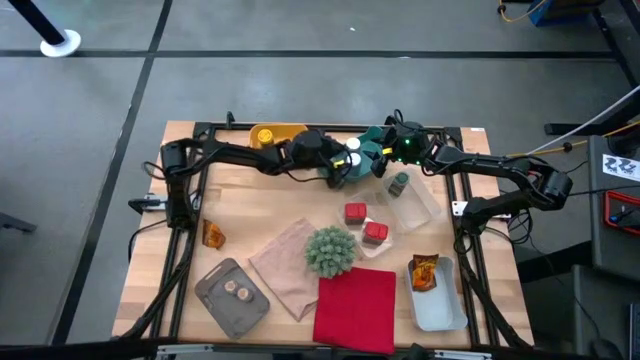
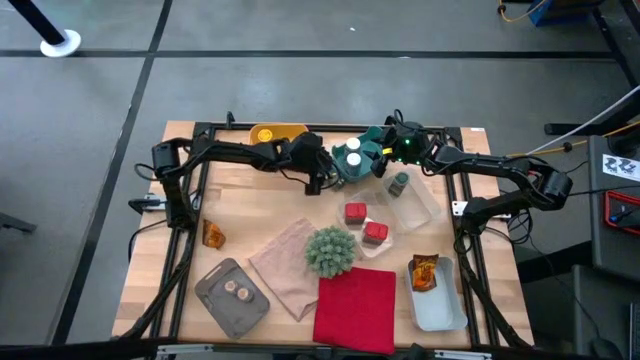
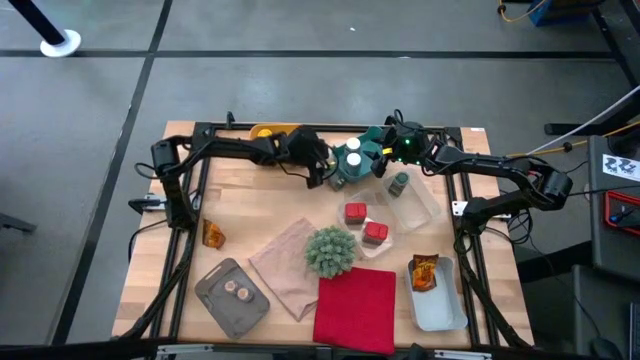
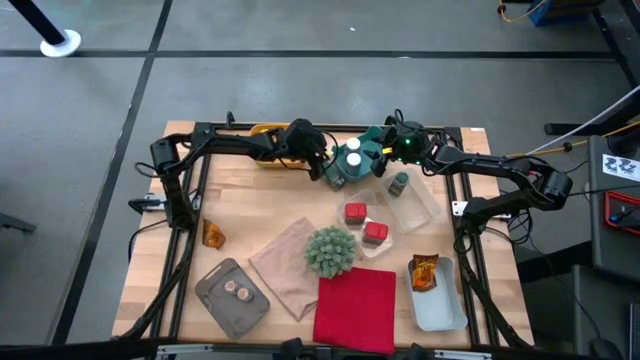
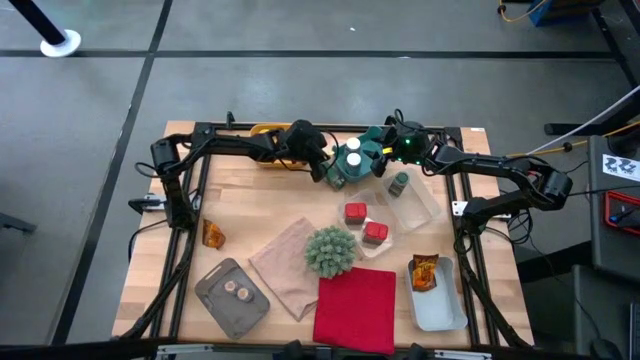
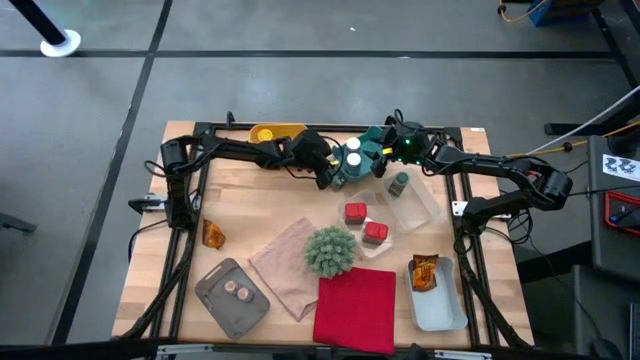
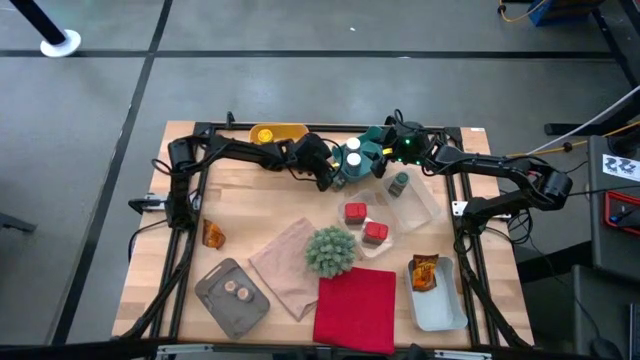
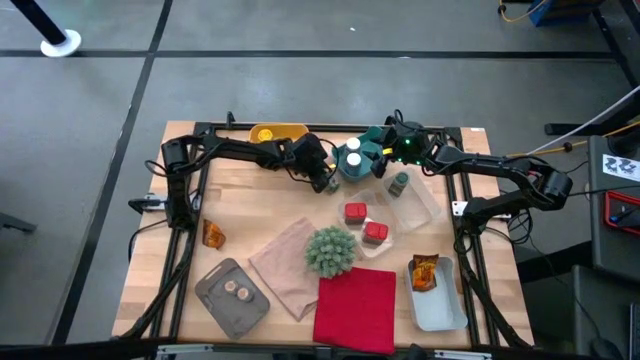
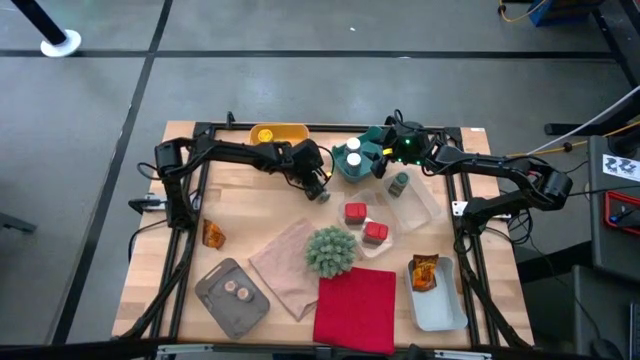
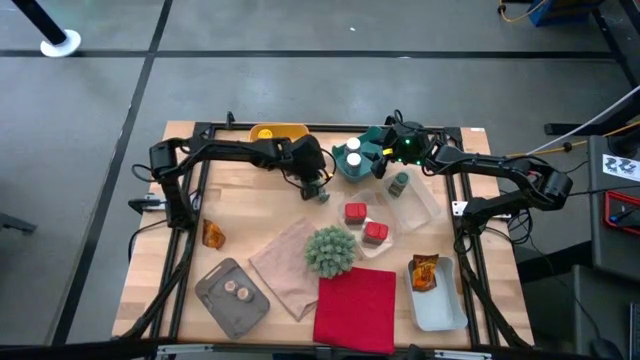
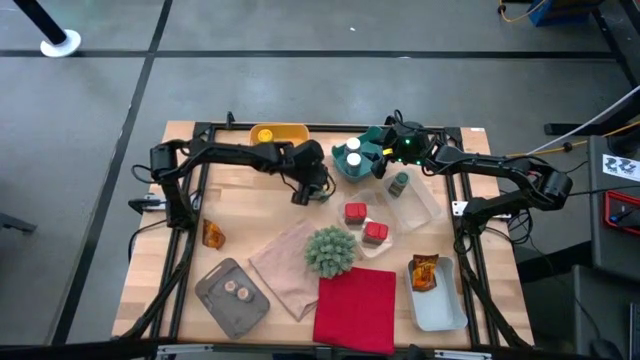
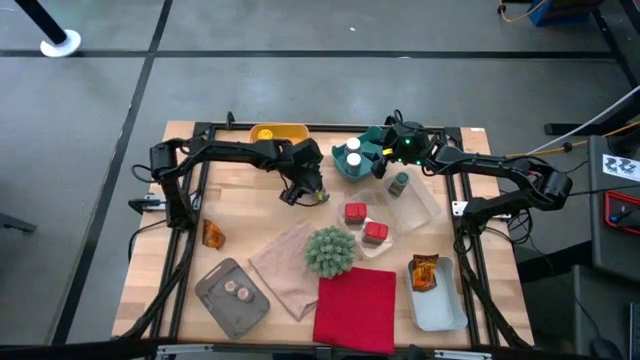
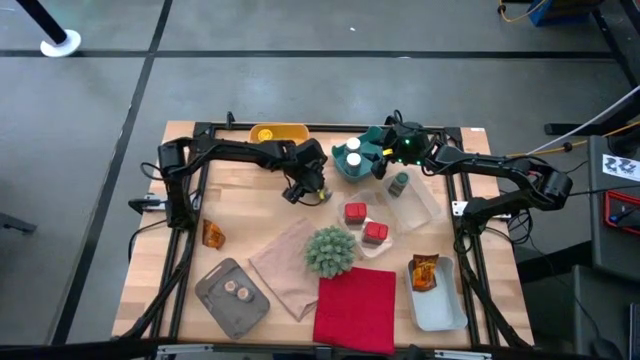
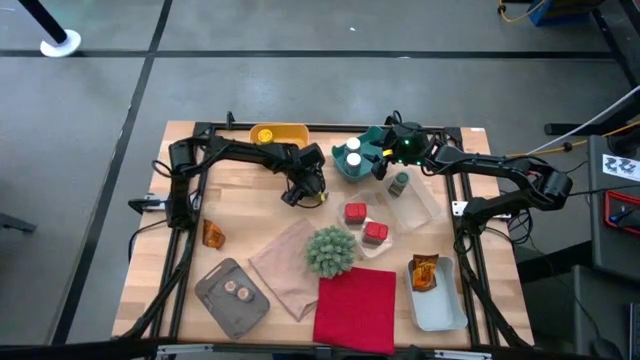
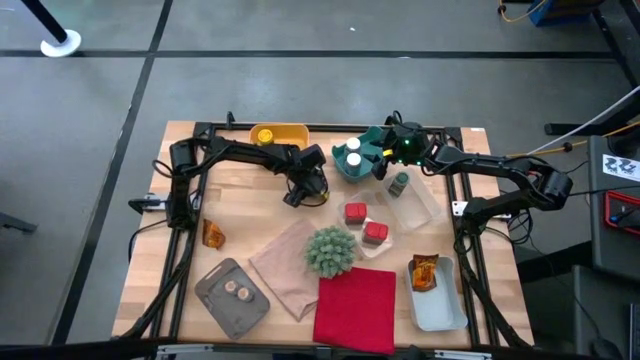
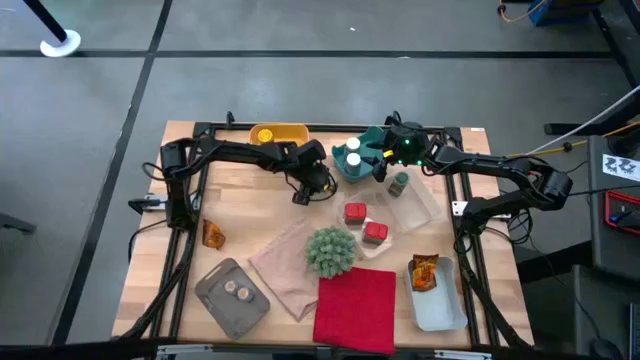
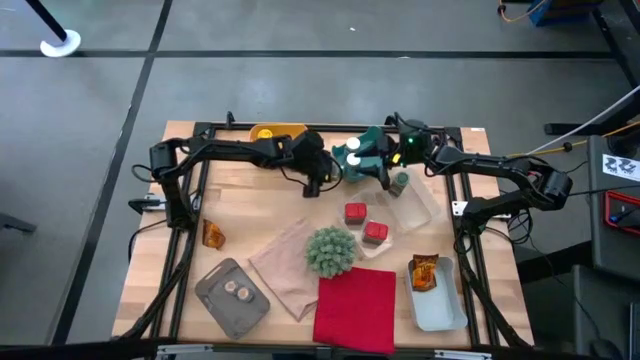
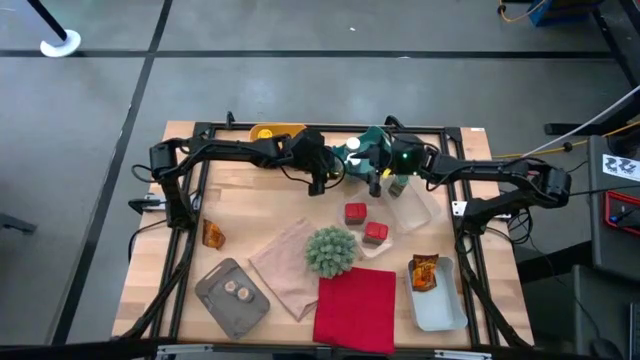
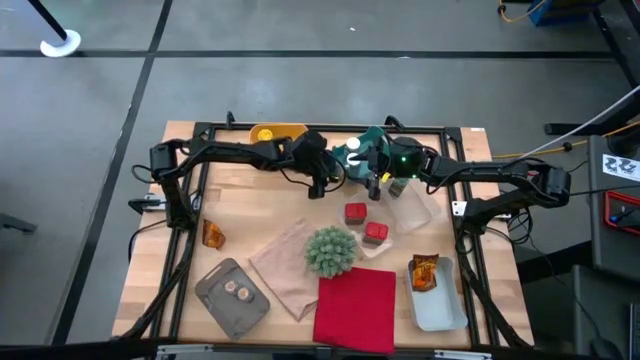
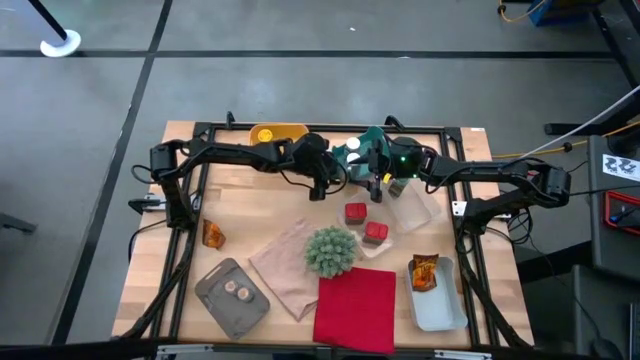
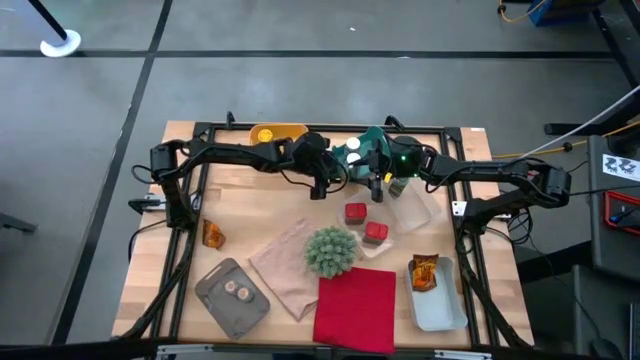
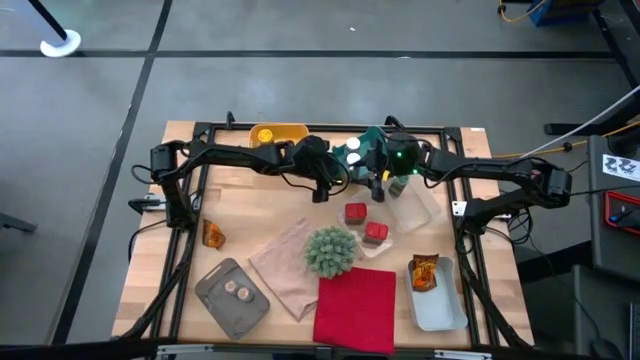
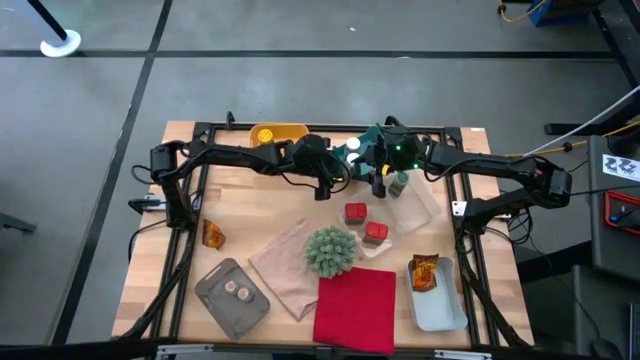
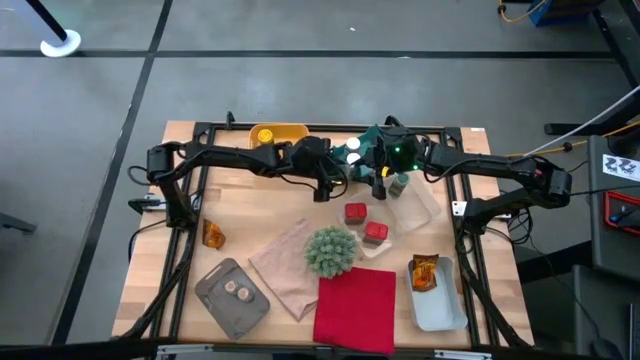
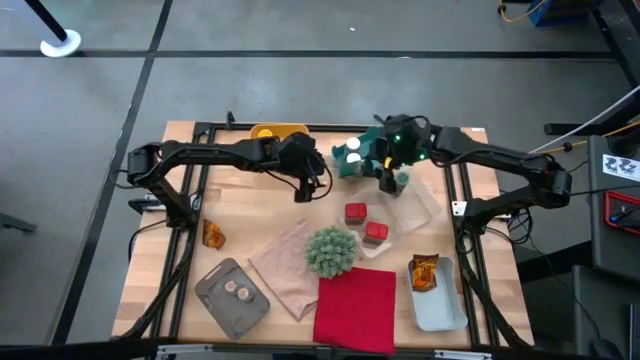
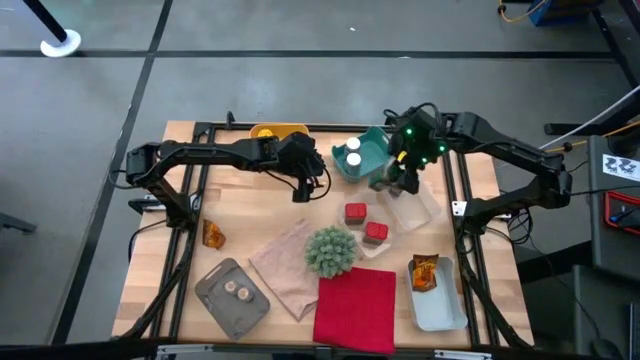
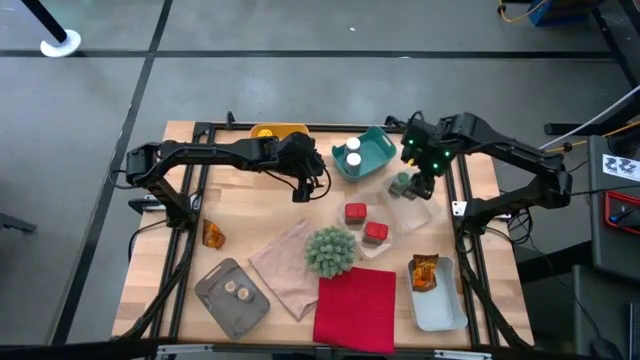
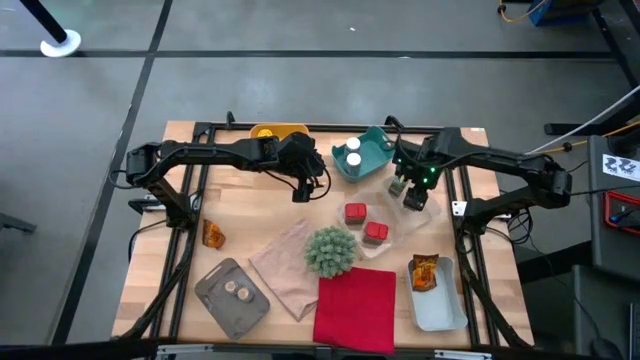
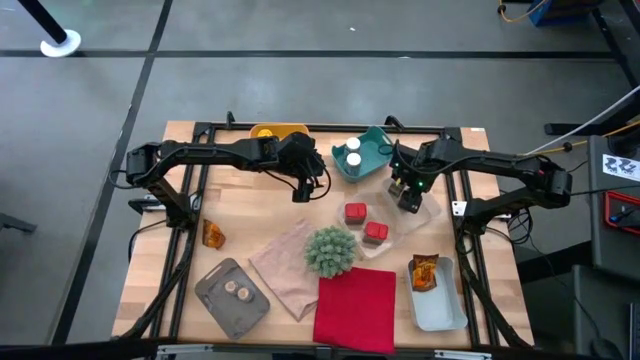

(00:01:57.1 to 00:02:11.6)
Task: Sort spices by type
Put the green seasoning bottle into the right transparent bin

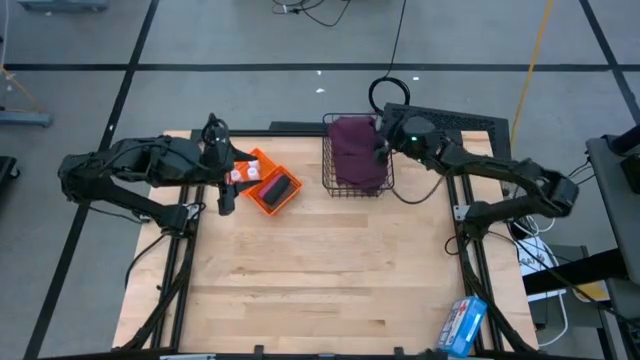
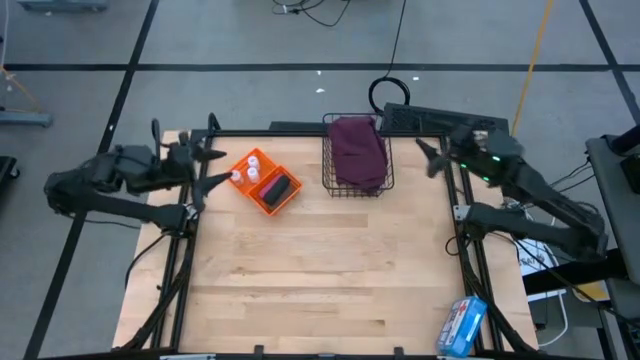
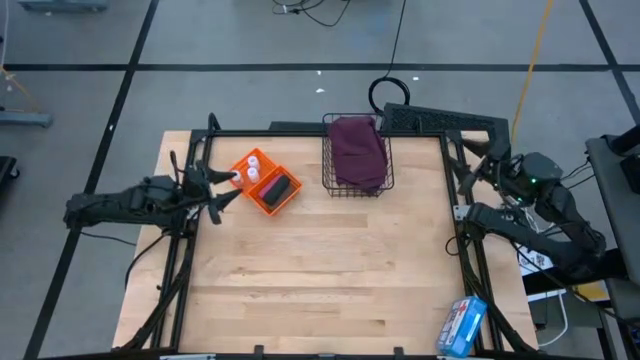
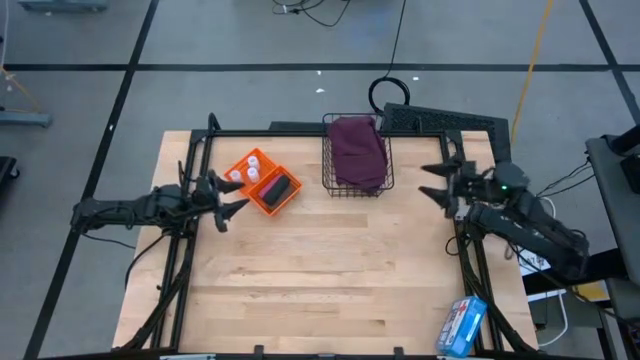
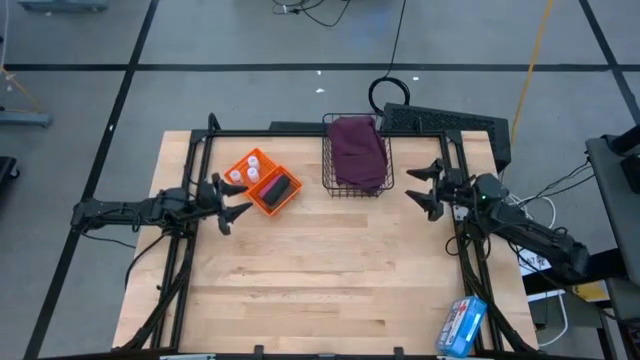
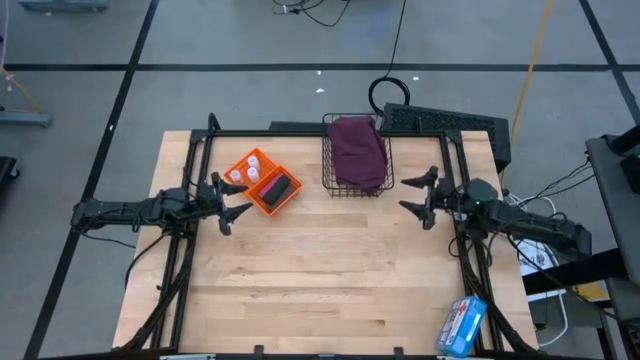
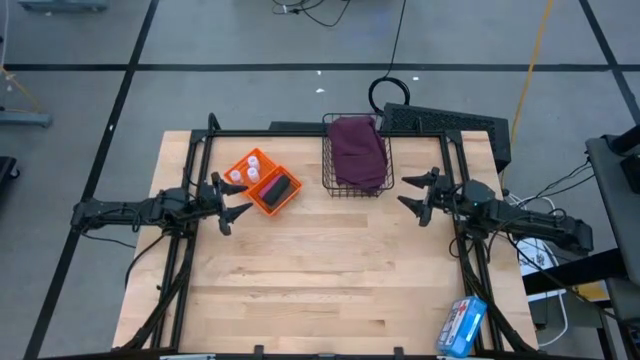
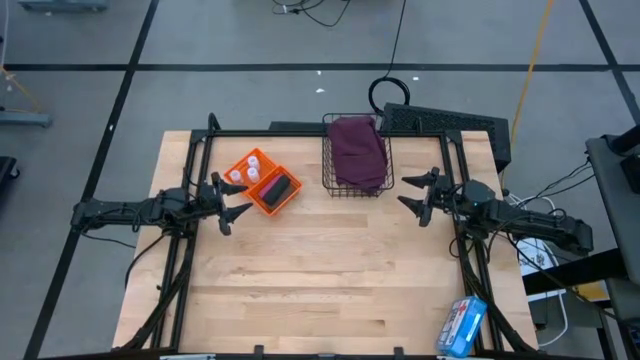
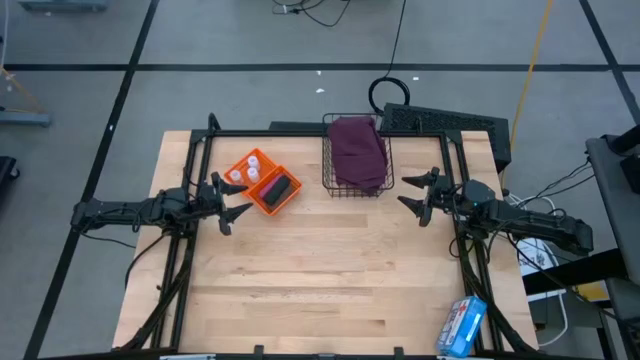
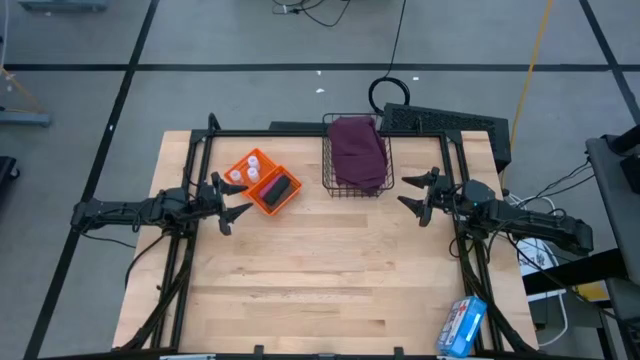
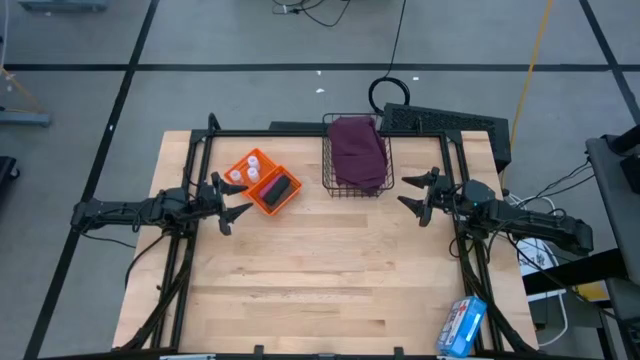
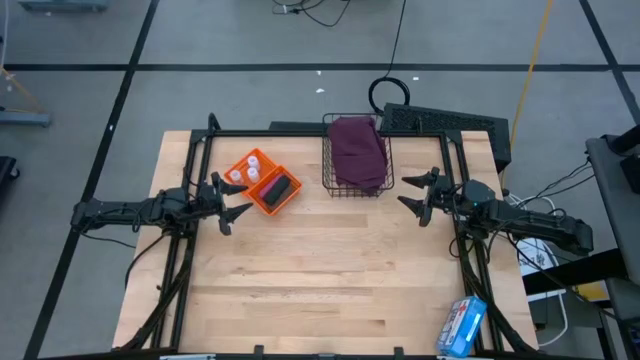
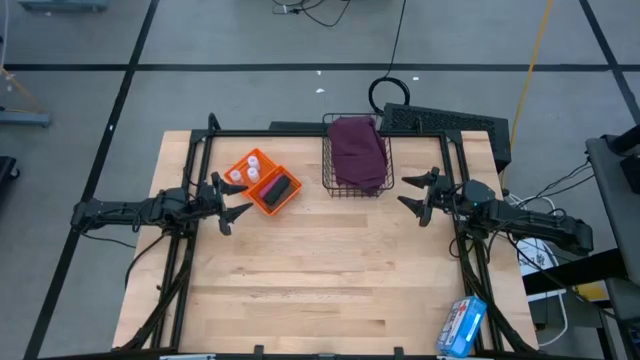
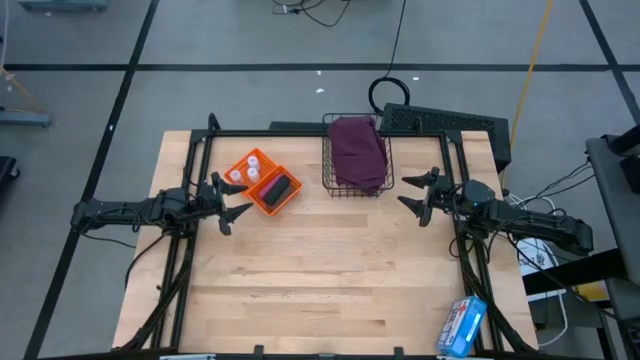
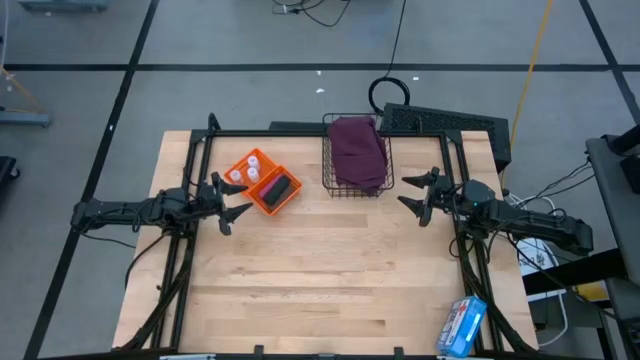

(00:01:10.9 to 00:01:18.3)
Task: Pick & Place Medicine items
Return to Home Position
